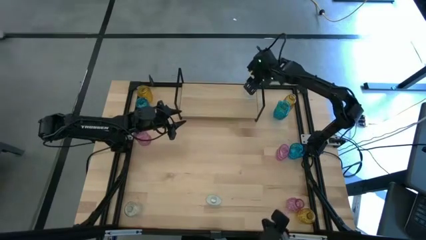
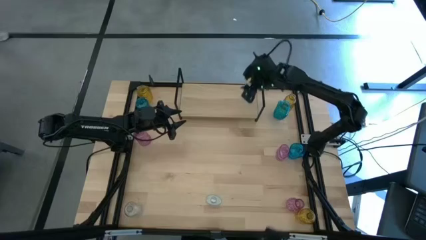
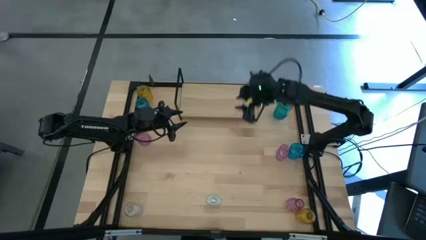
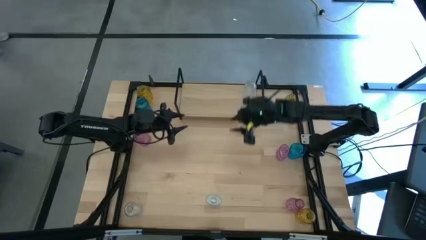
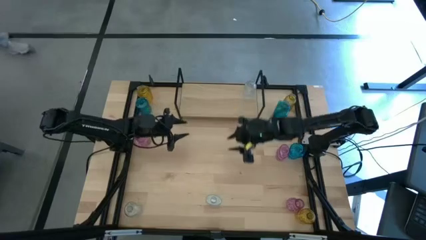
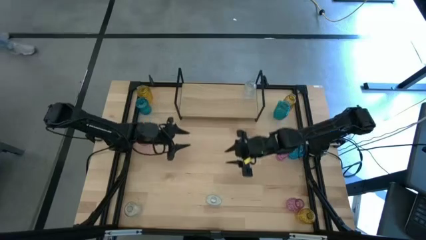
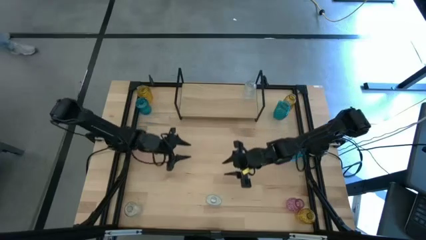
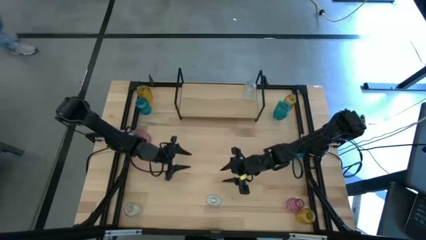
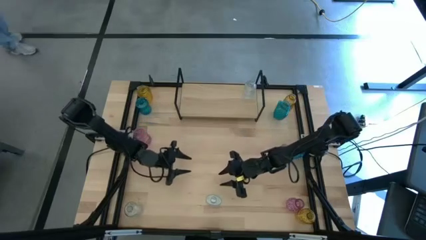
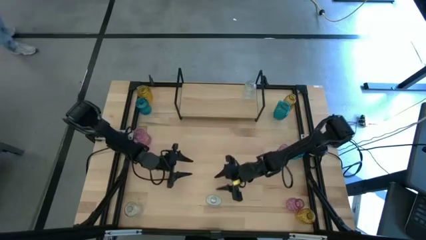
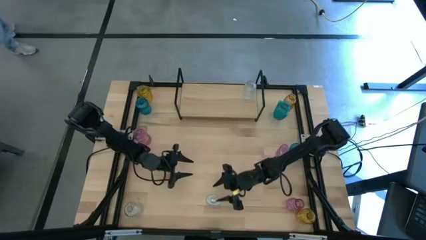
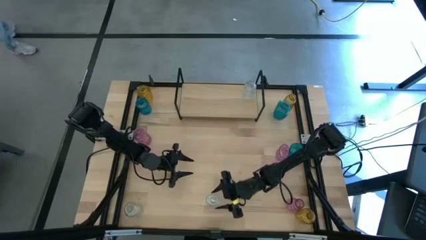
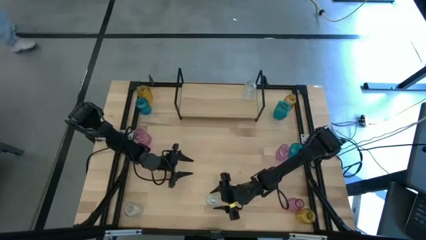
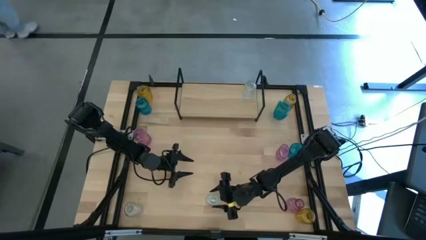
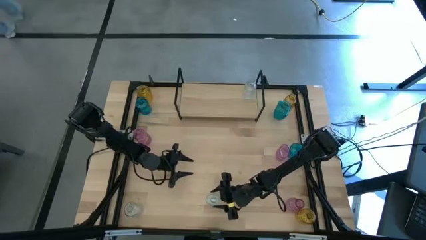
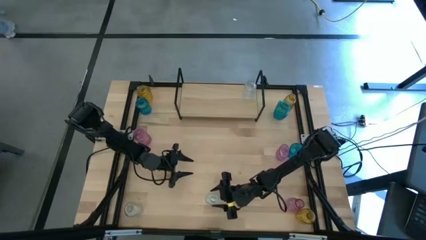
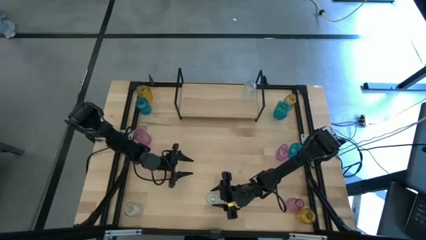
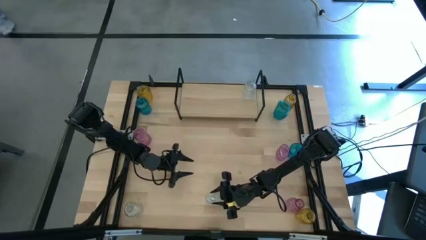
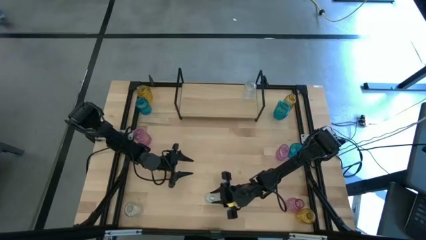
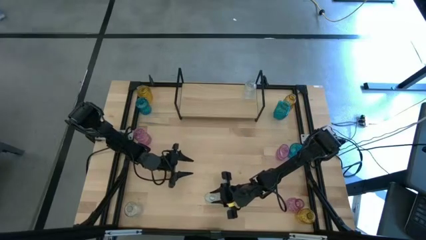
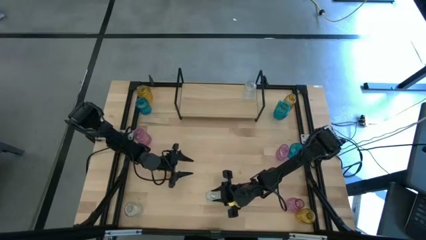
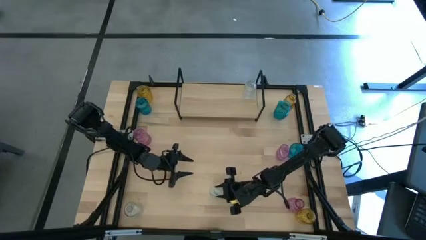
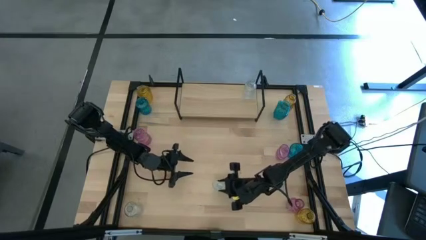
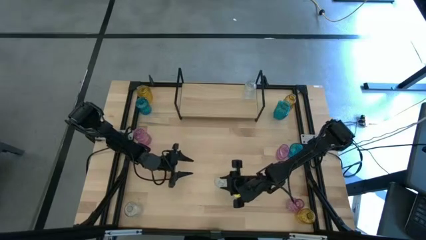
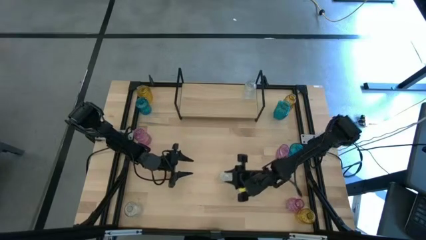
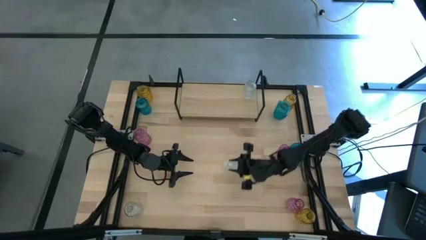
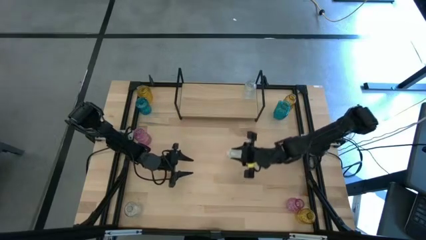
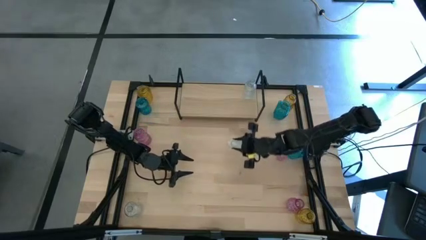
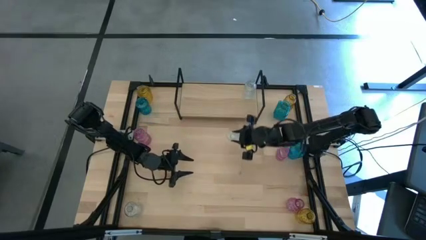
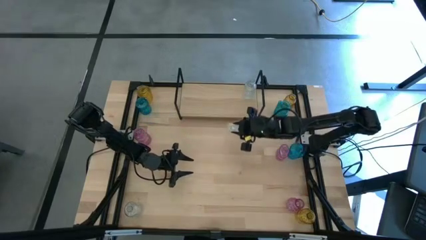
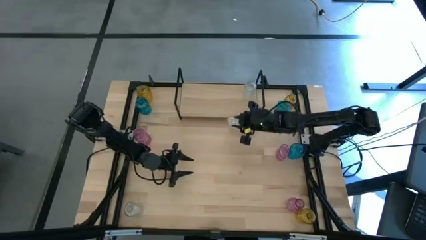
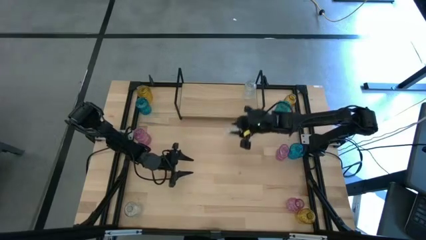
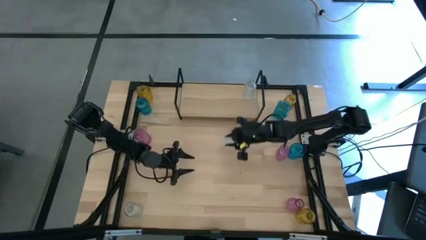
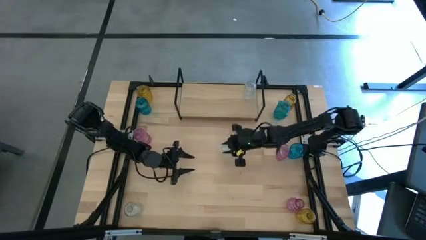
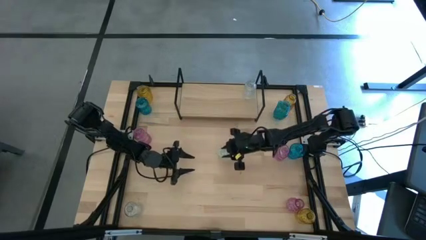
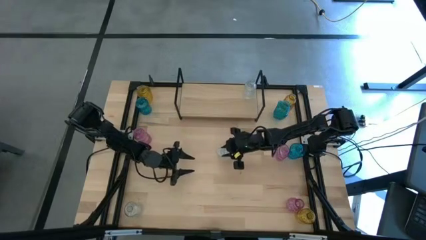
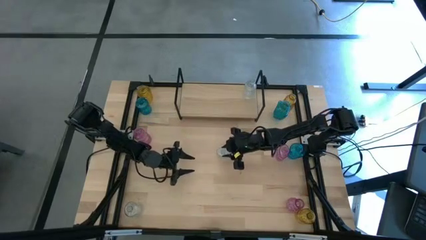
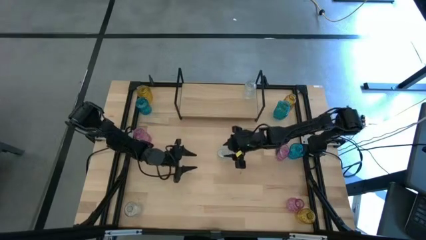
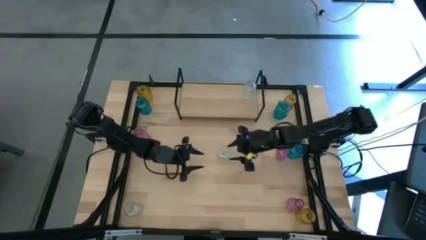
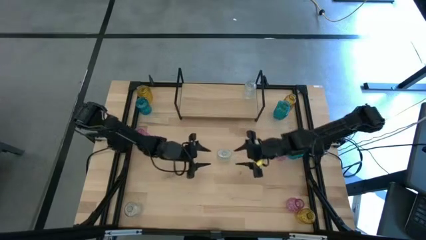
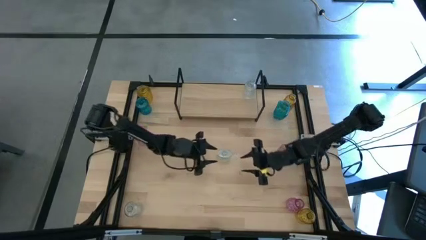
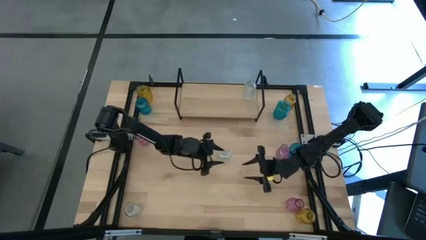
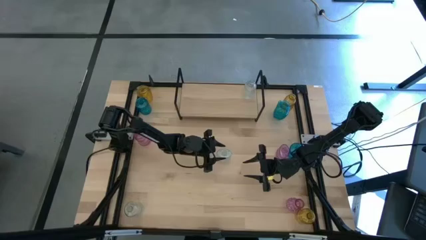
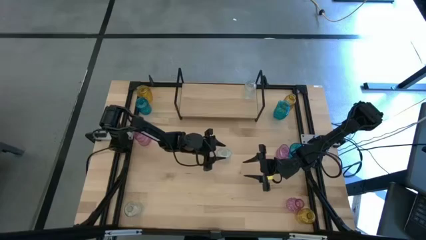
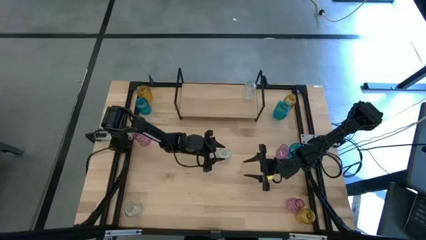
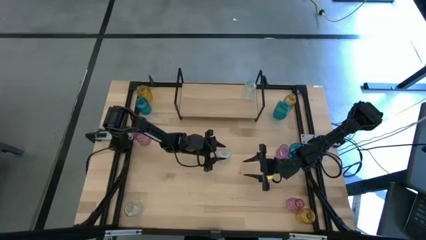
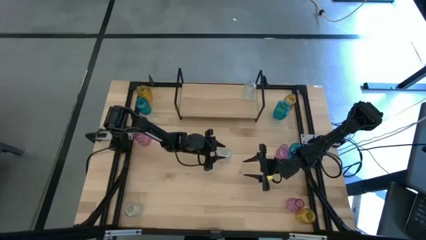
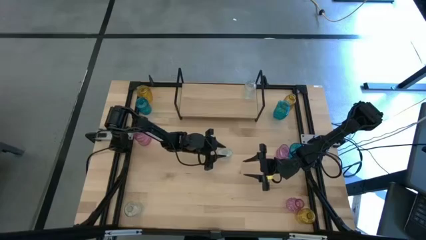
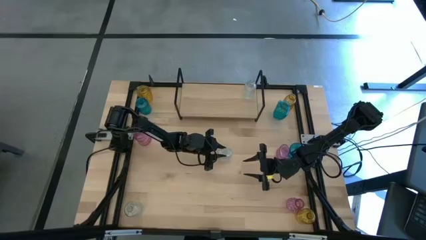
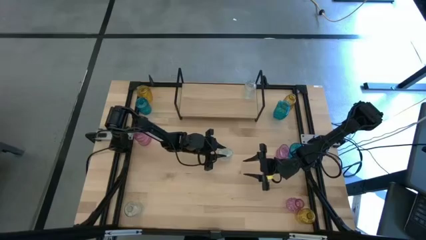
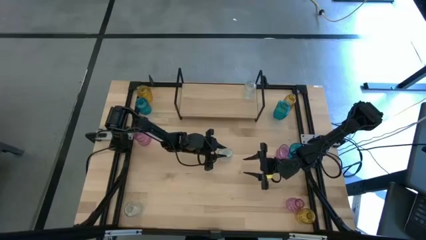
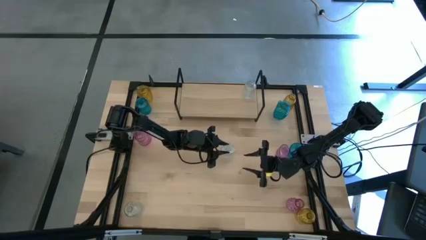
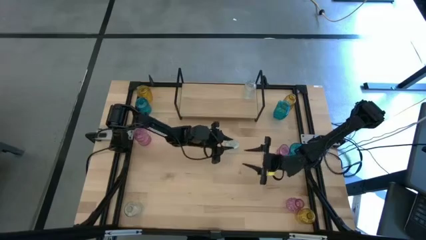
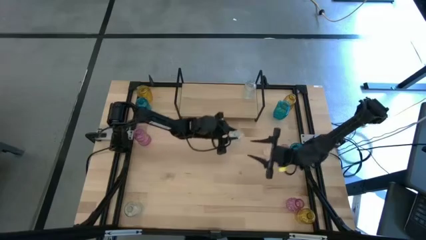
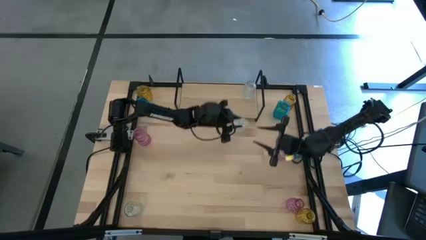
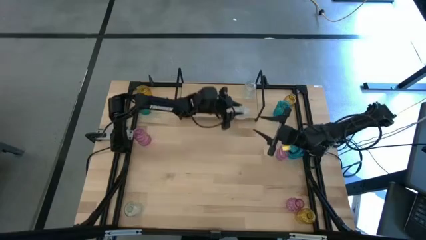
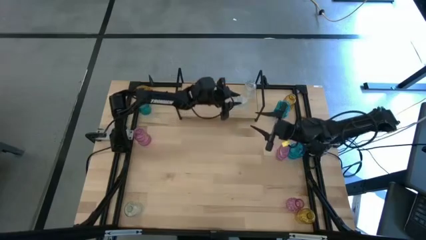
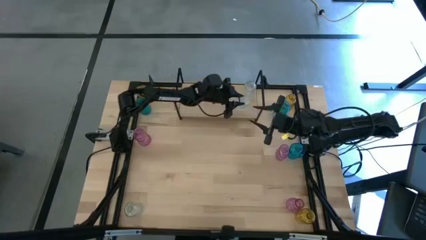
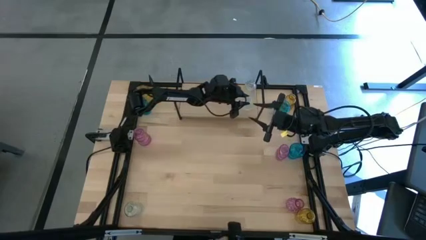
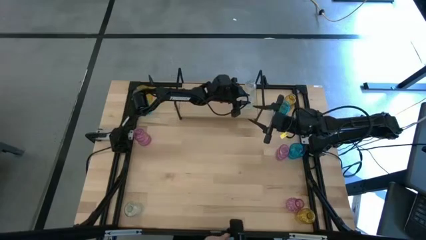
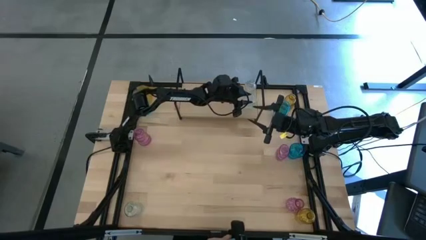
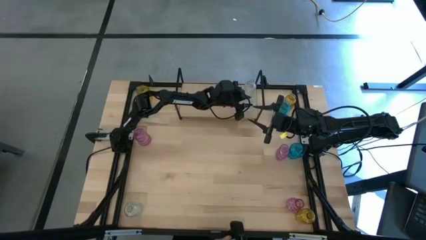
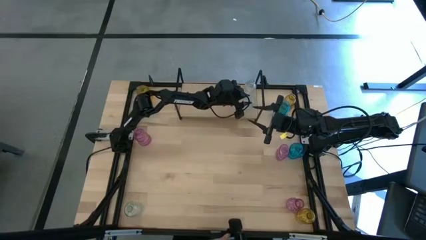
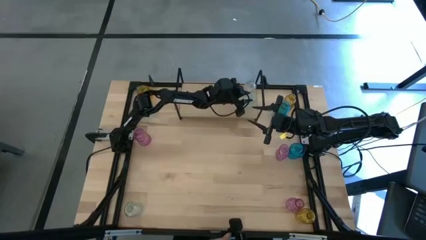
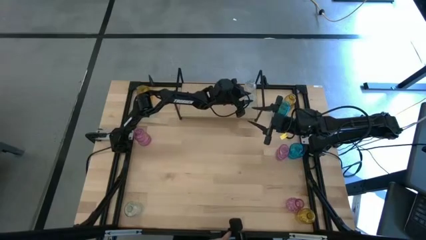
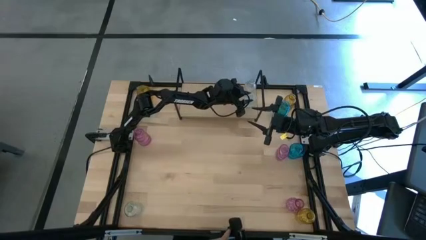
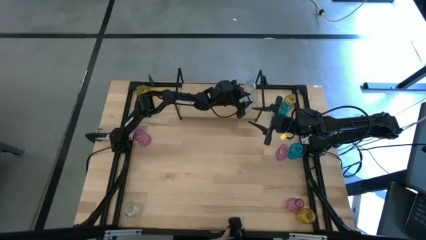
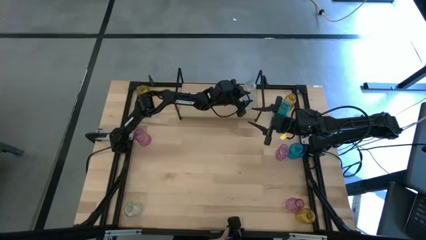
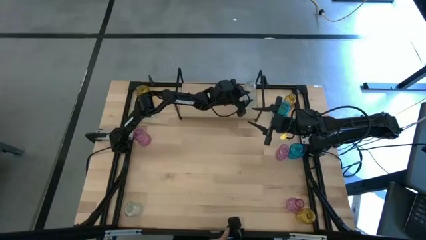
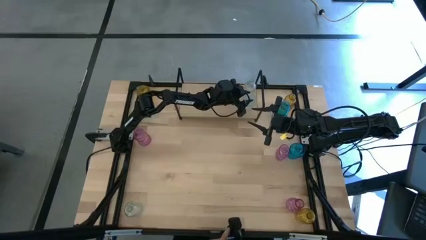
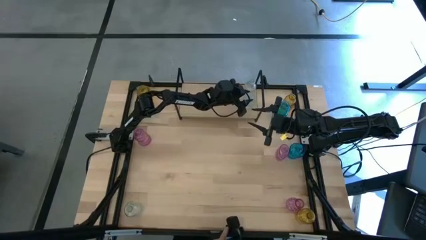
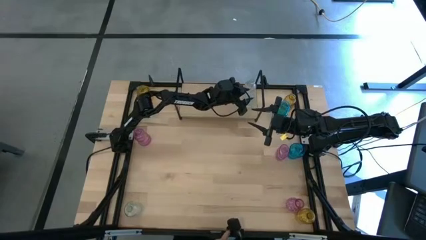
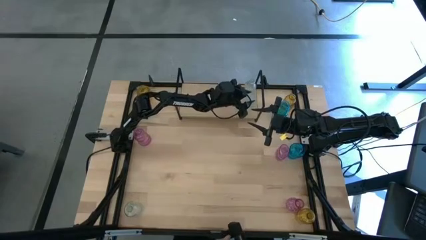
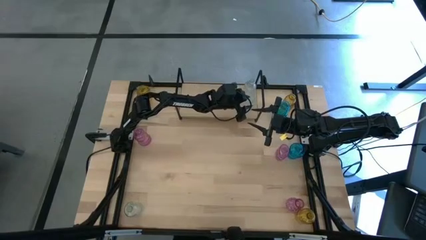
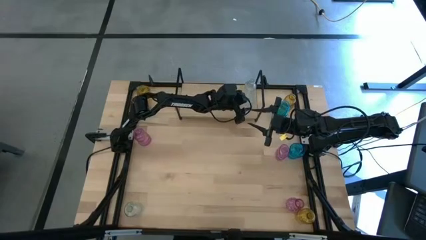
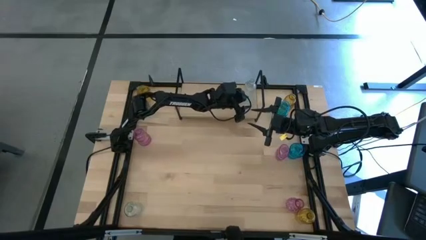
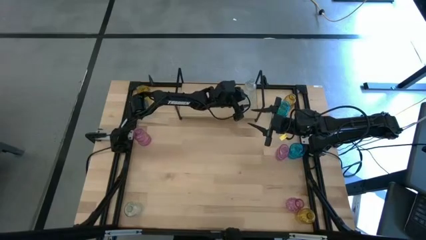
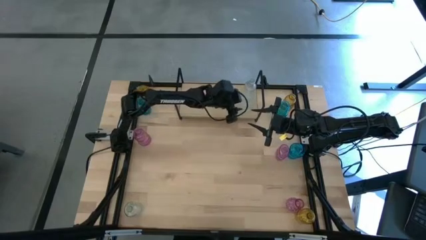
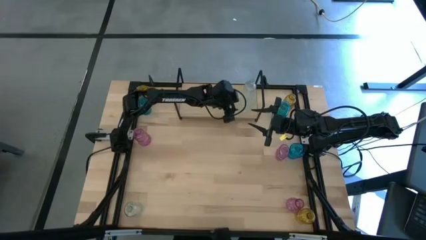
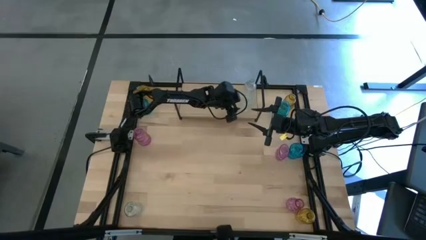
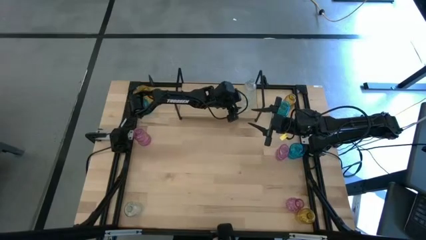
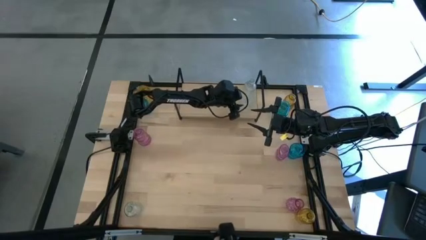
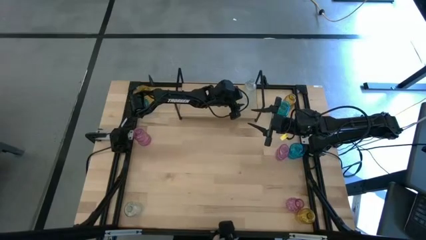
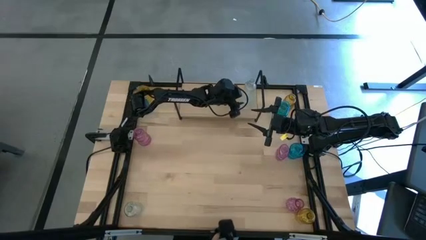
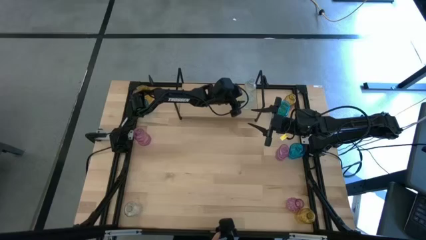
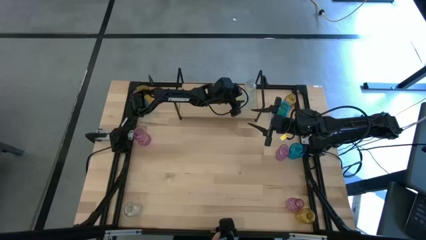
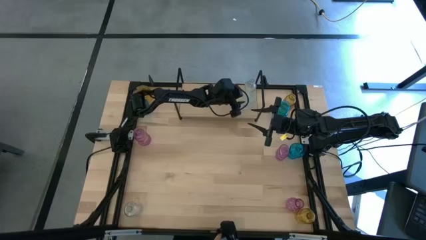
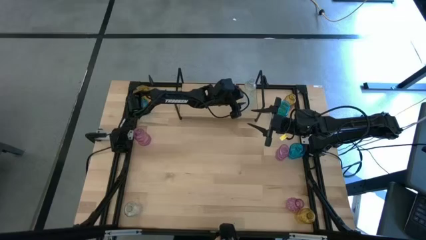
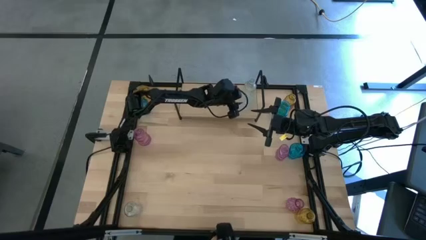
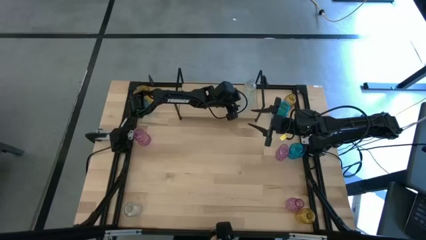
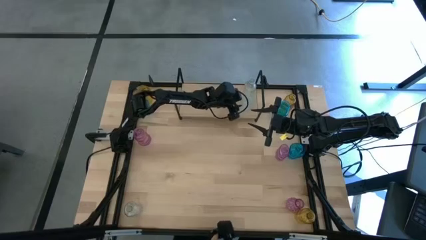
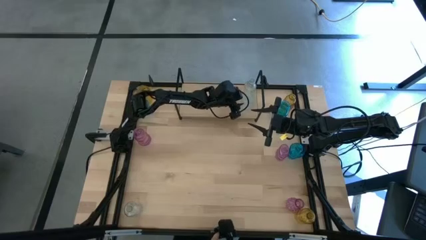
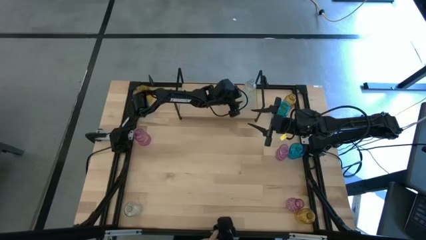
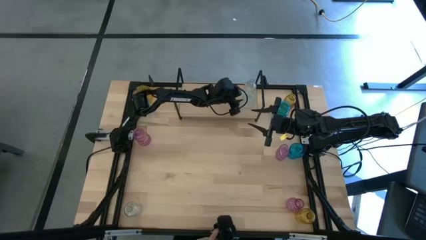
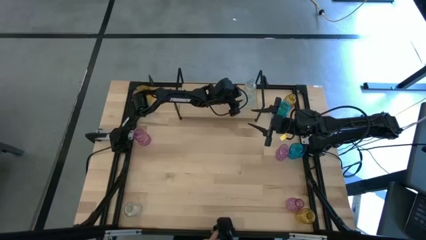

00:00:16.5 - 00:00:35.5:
Task: sort vases onto shelf
Put the right transparent vase on the shelf aligned with the other transparent vase
